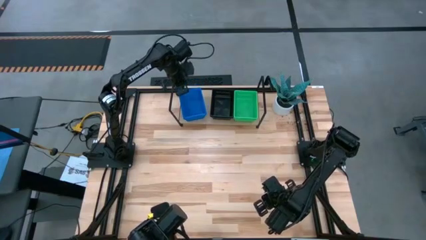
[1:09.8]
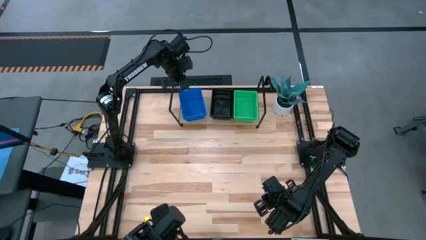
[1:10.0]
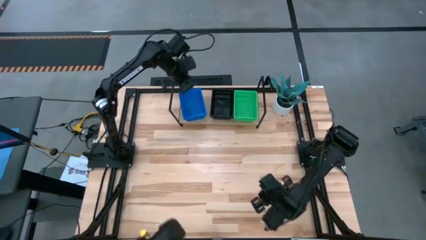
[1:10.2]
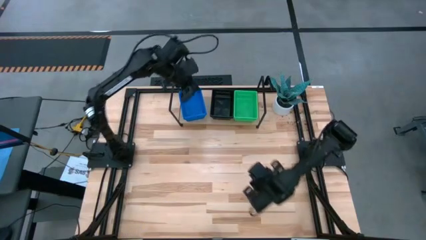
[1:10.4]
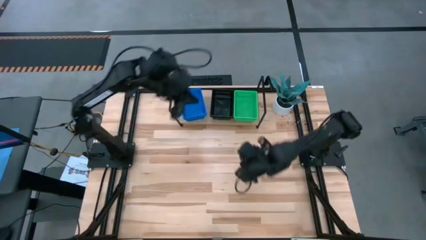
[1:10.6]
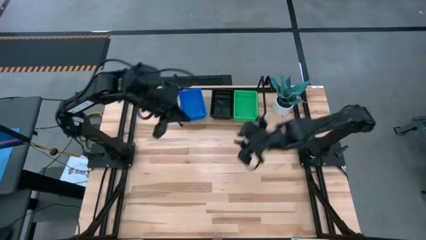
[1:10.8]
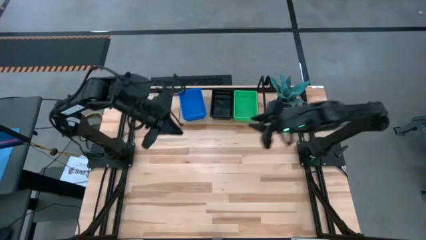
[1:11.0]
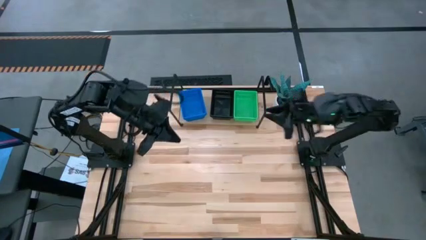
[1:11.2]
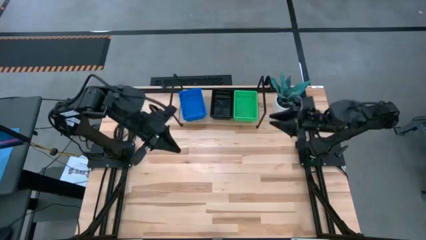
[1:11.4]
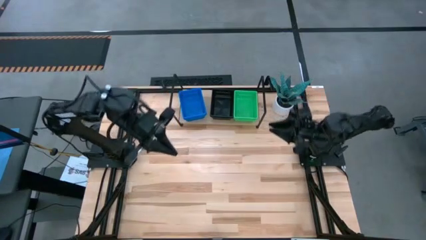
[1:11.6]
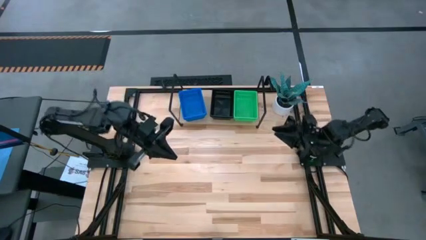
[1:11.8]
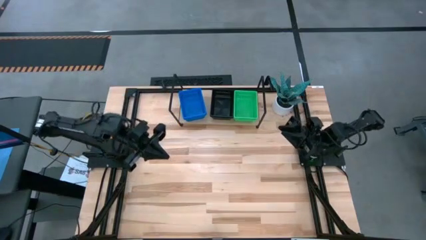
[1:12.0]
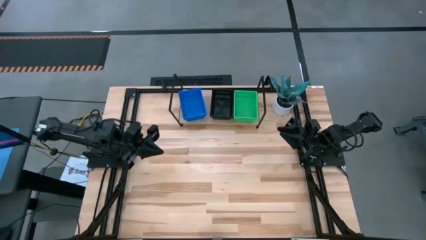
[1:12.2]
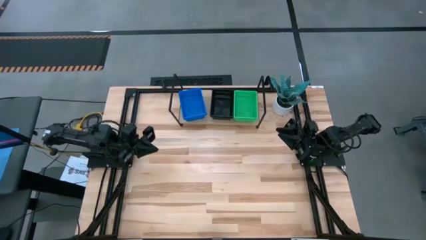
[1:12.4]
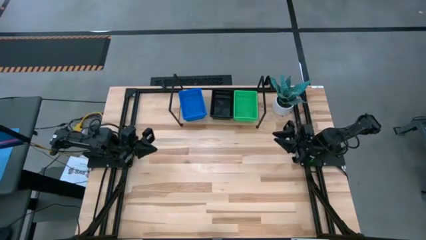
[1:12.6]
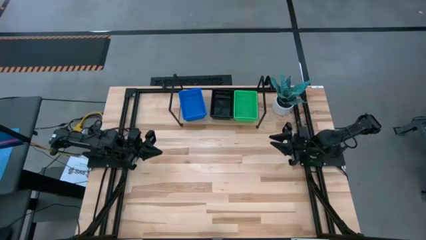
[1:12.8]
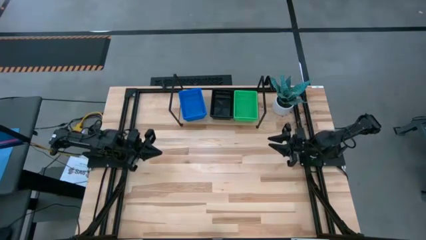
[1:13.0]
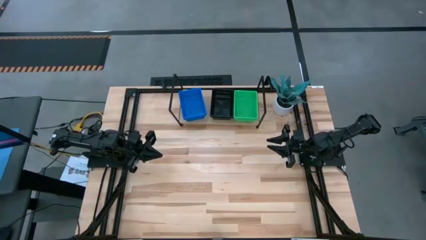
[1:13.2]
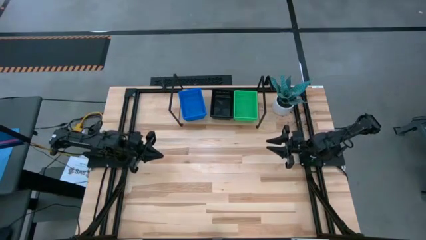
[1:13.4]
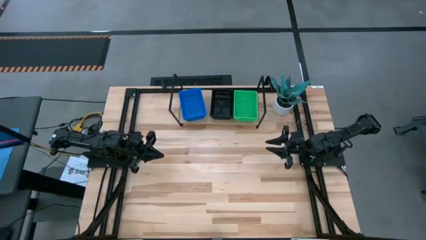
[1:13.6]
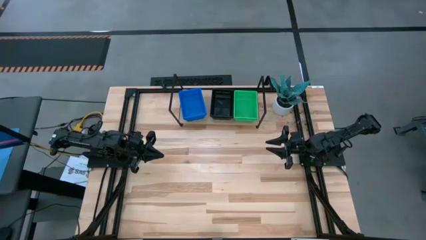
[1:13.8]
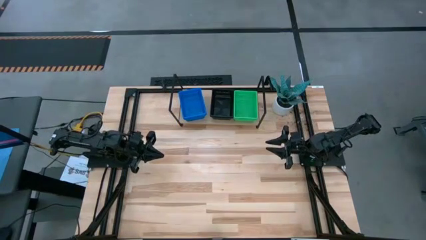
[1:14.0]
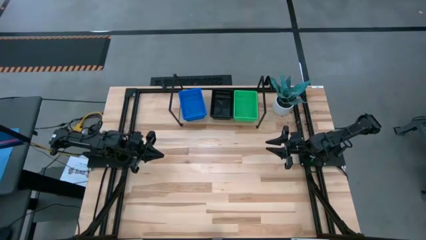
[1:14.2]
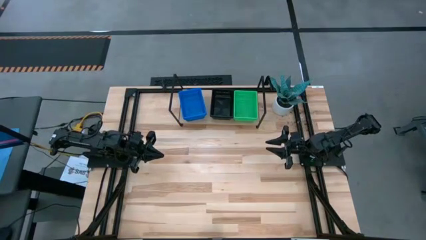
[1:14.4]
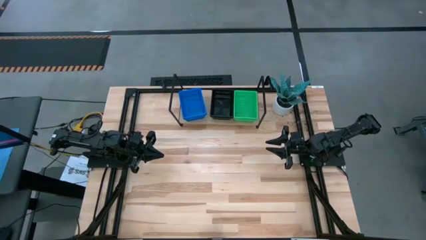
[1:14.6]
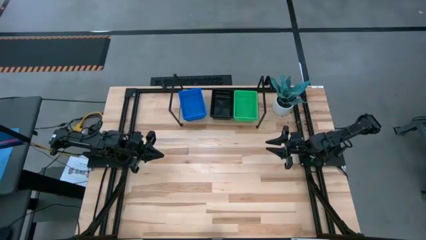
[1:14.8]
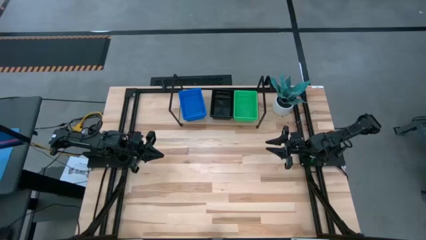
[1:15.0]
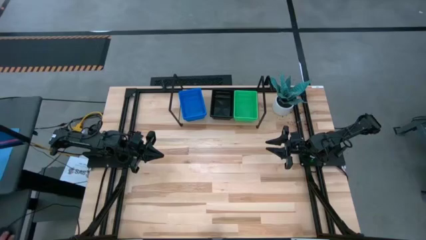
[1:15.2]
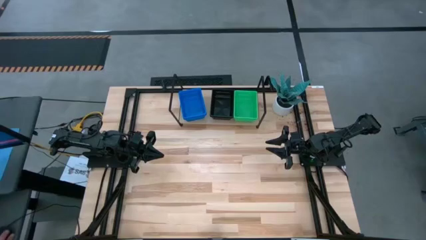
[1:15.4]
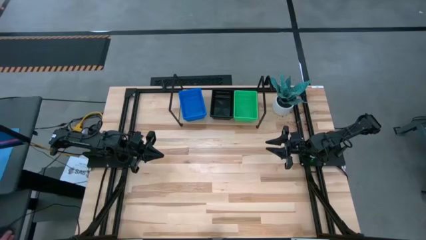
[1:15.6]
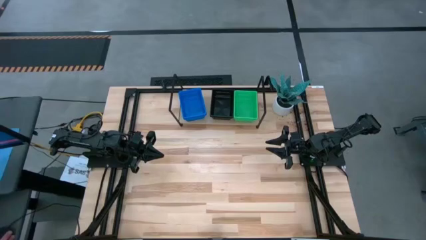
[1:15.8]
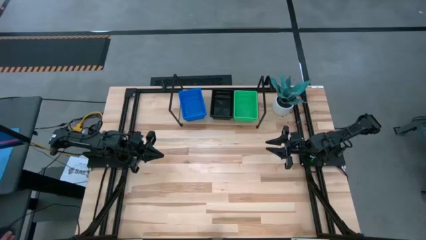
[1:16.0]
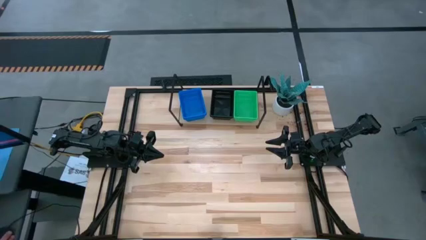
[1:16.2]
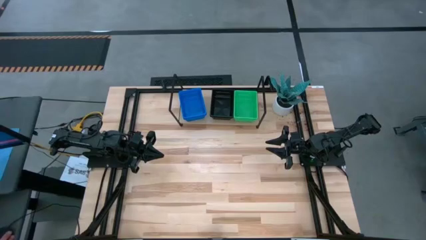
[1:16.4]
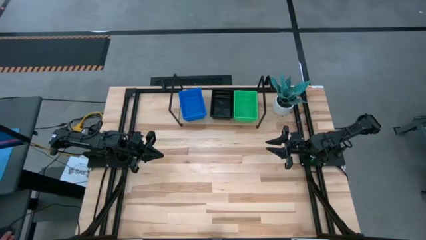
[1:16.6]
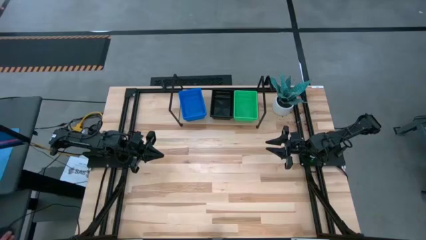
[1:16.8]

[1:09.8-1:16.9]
Task: Stack baskets on shelf by color
Return to Home Position

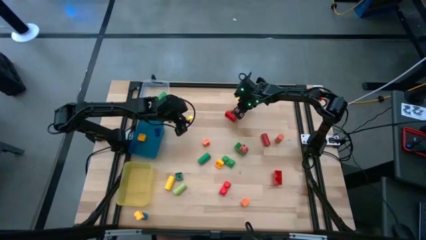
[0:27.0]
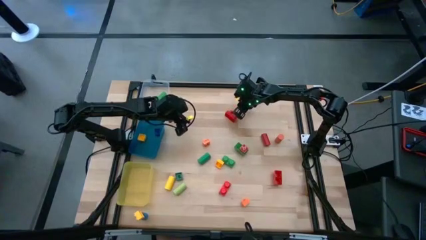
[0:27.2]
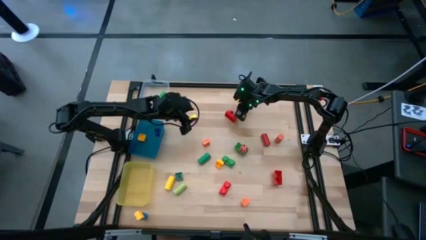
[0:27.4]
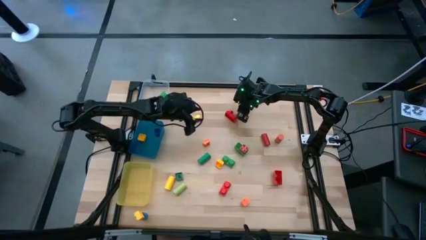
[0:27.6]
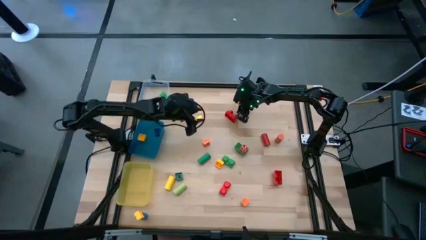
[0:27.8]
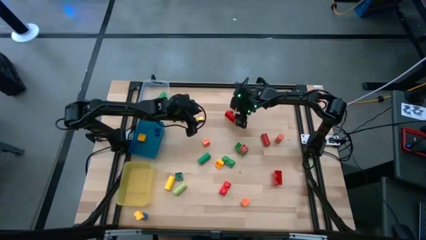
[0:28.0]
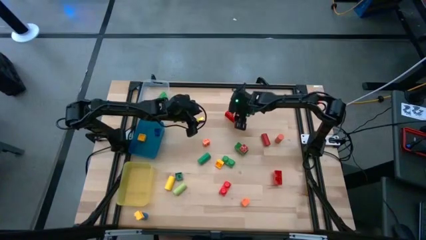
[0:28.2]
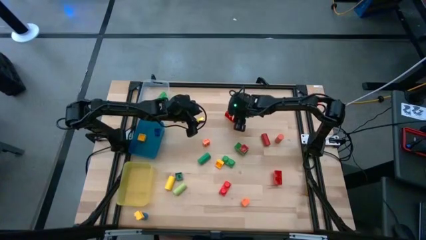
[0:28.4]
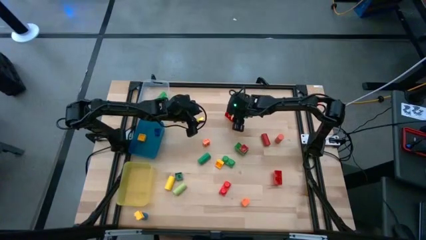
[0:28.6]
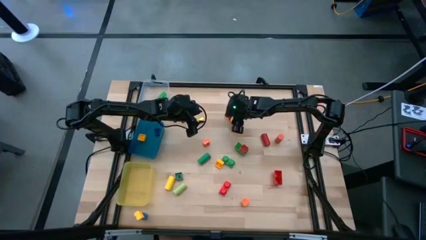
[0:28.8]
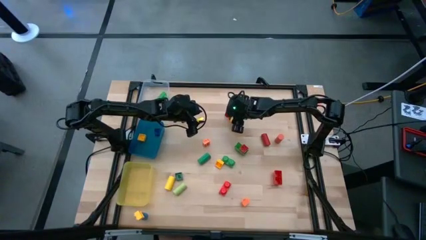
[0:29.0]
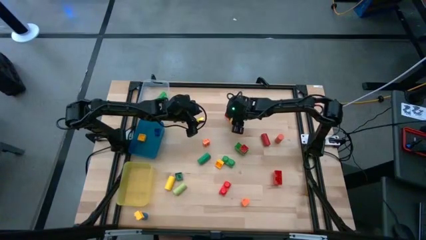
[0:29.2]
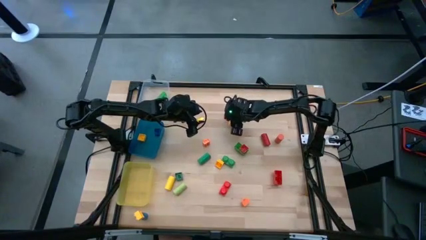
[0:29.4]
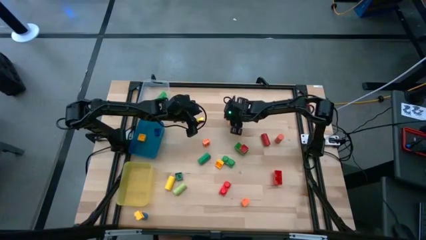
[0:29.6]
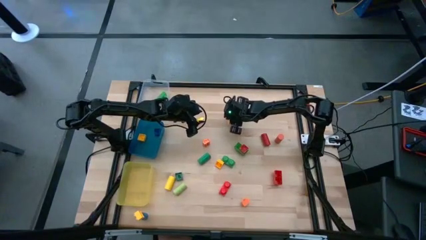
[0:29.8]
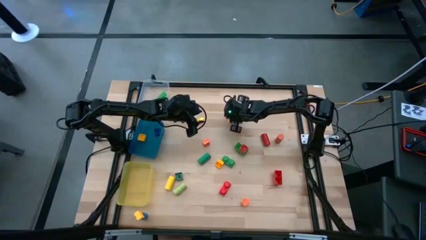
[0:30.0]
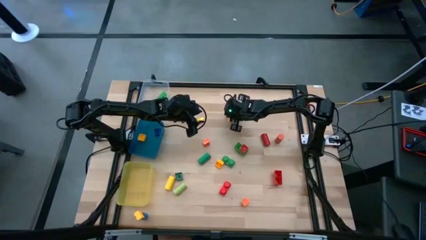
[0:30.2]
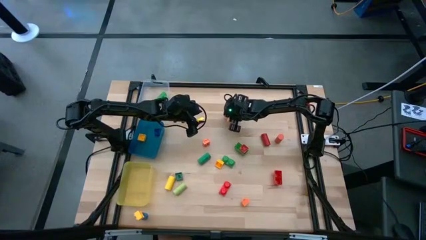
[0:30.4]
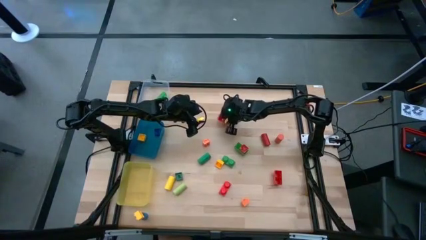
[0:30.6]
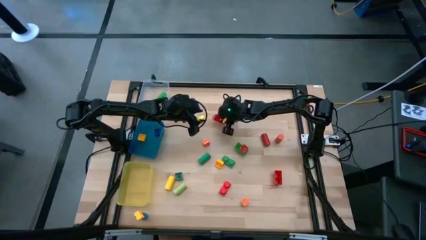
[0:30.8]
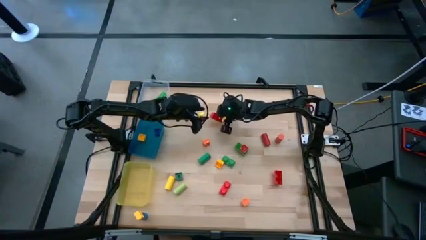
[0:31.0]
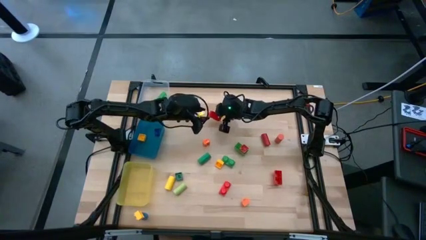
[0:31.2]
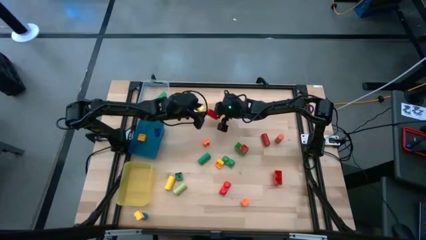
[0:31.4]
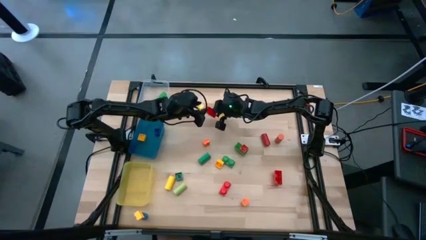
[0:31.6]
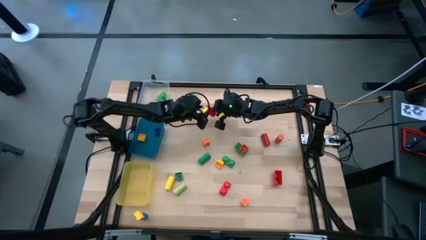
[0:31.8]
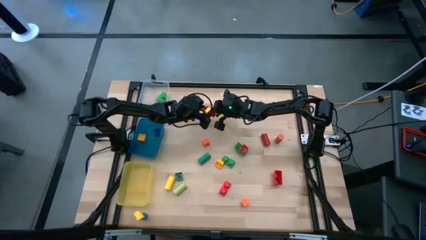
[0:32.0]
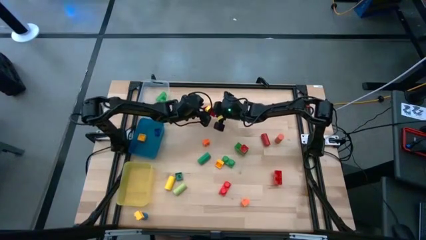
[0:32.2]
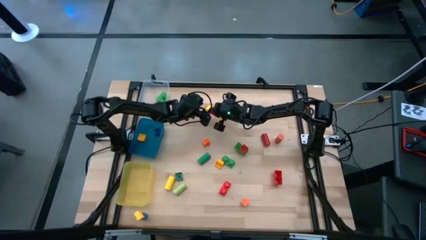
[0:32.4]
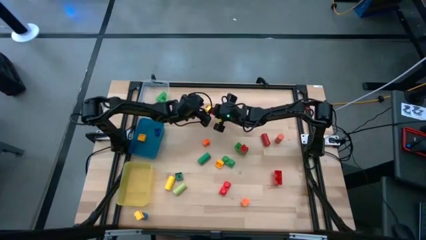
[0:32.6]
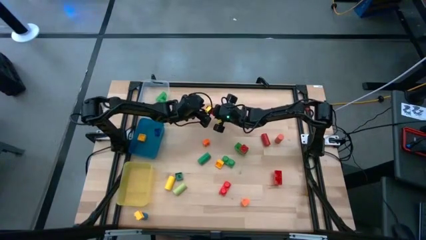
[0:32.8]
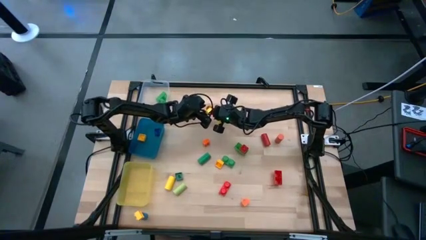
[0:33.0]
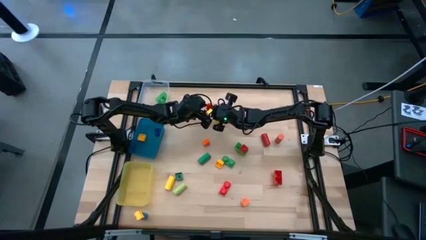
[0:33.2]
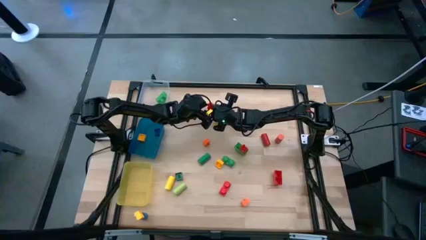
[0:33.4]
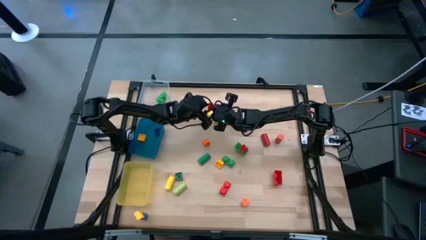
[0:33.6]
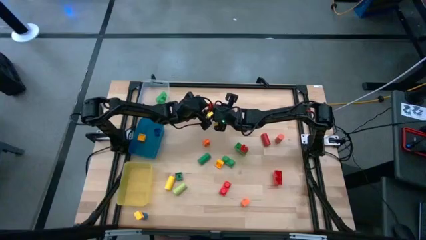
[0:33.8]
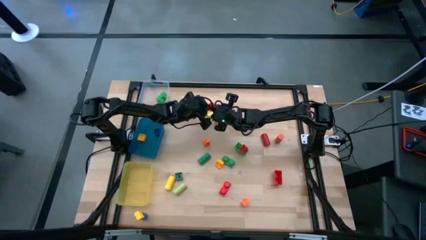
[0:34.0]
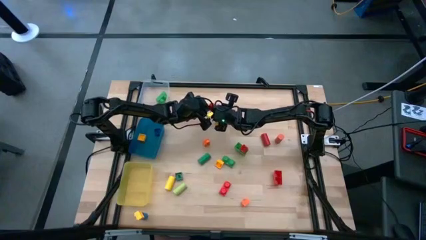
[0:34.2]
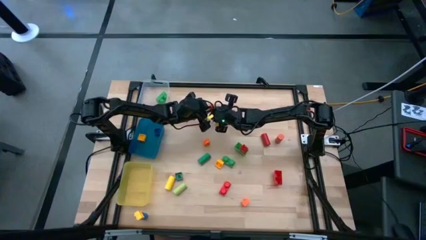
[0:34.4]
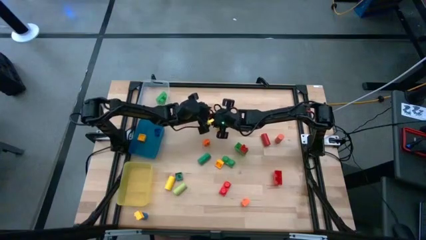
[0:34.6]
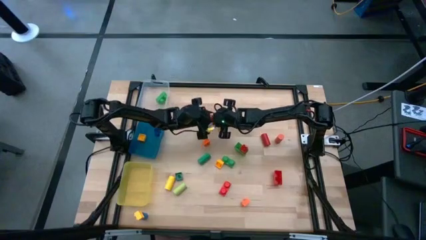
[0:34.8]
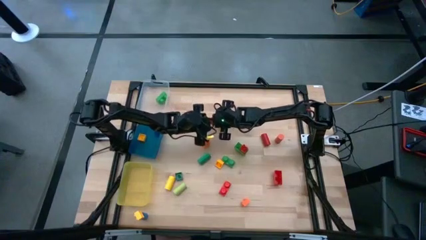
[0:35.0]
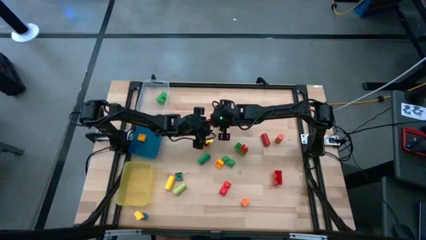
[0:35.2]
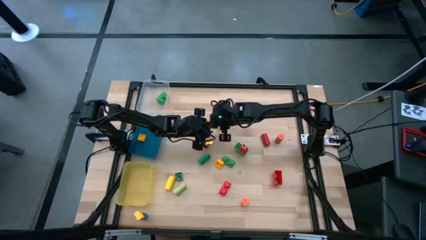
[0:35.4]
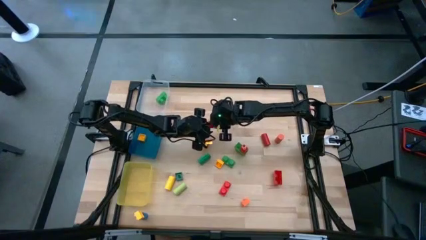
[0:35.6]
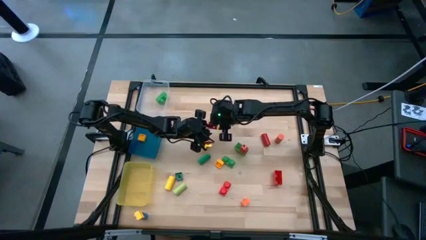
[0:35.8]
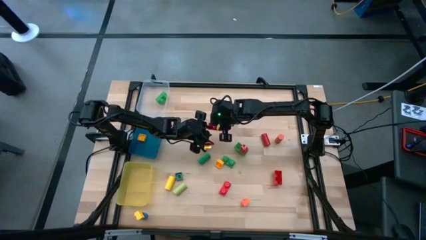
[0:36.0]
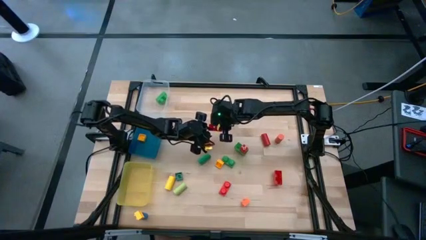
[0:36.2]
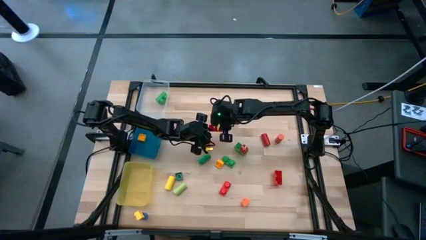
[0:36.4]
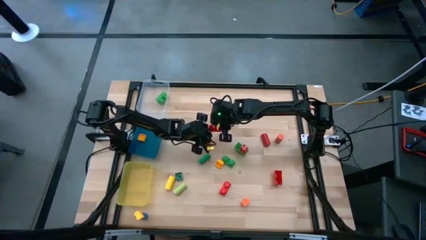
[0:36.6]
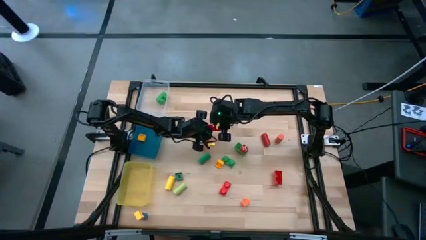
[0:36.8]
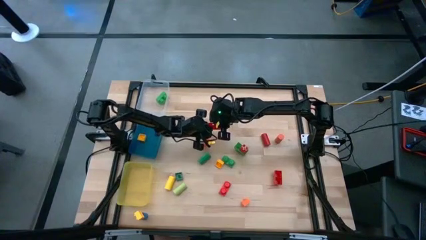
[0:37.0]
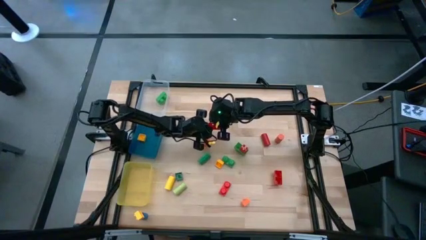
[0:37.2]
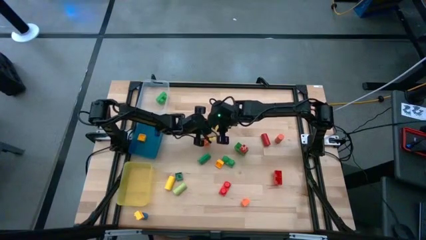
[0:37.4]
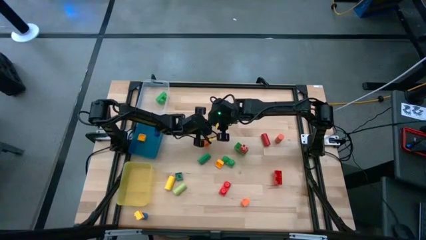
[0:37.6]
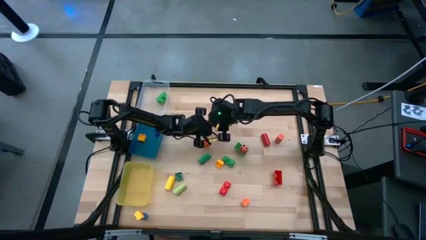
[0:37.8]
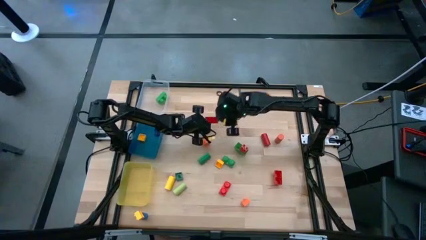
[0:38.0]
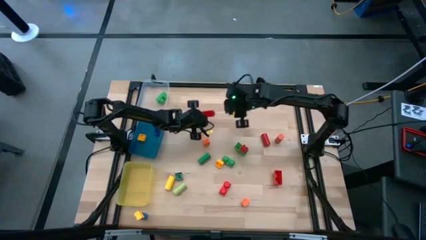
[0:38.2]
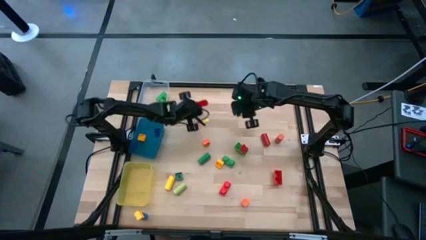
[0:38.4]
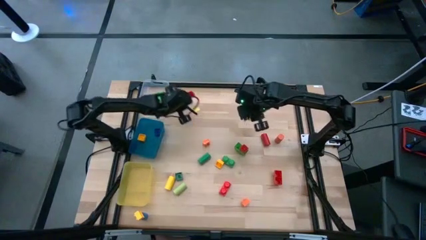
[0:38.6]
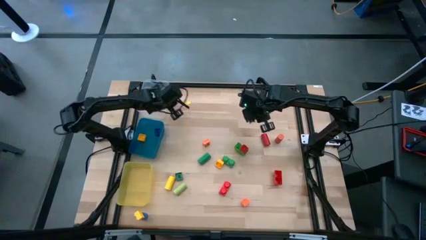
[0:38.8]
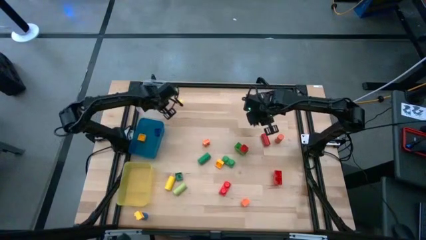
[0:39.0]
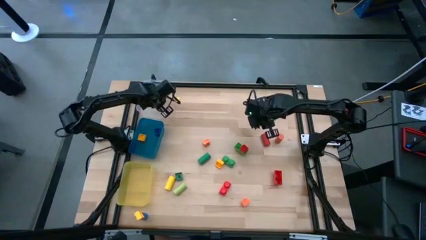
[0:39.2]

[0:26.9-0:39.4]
Task: Sort blocks by size
Put the top red 2 stud game piece into the transparent bin
